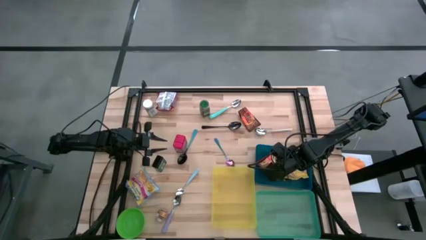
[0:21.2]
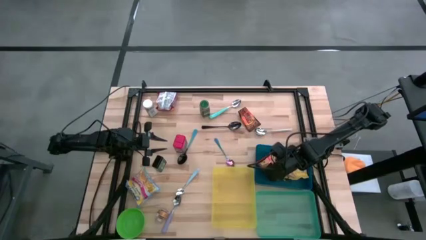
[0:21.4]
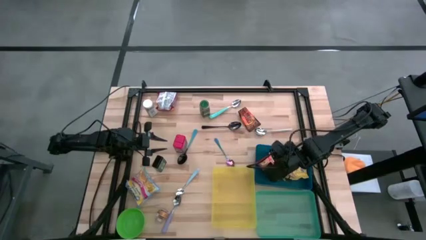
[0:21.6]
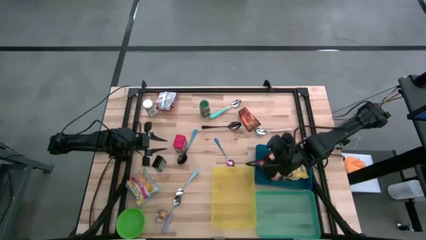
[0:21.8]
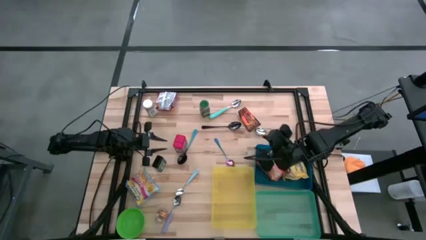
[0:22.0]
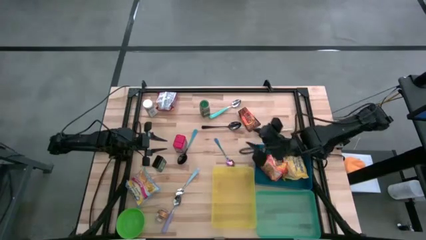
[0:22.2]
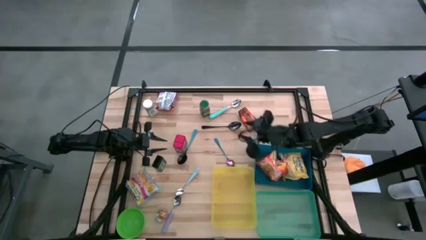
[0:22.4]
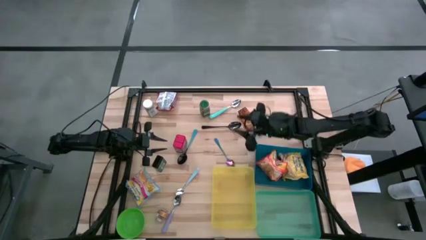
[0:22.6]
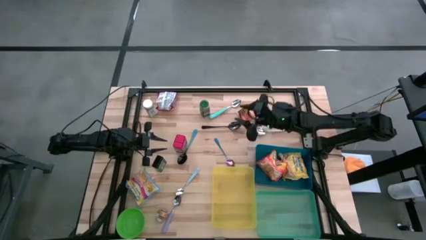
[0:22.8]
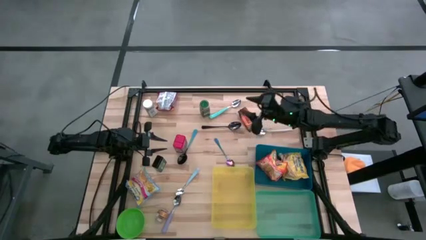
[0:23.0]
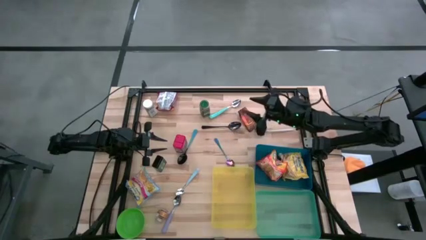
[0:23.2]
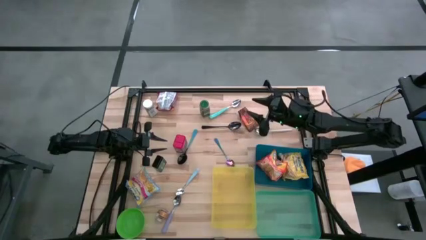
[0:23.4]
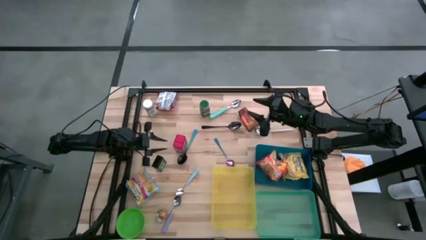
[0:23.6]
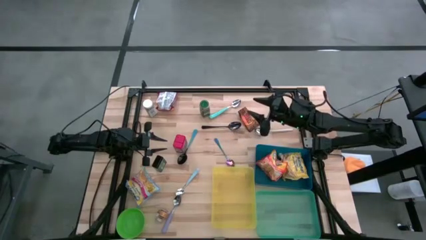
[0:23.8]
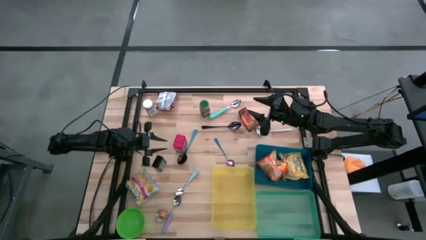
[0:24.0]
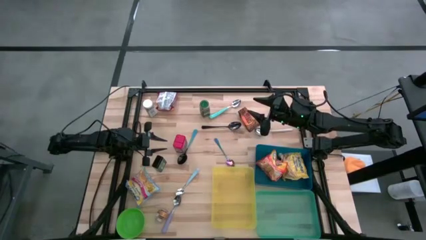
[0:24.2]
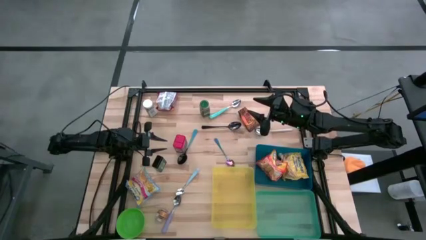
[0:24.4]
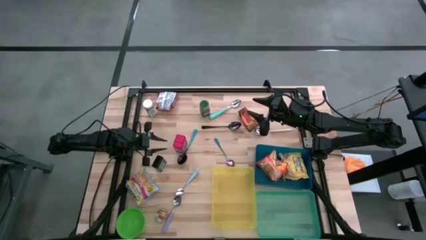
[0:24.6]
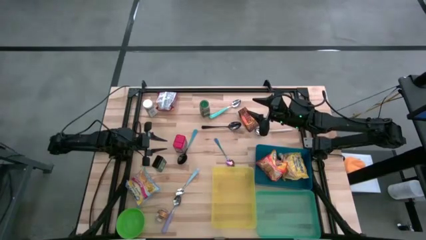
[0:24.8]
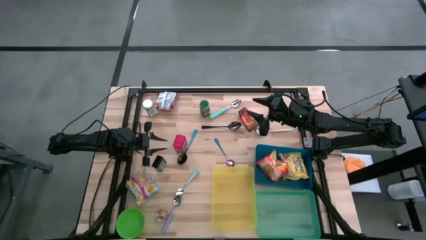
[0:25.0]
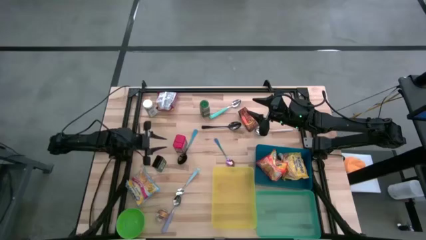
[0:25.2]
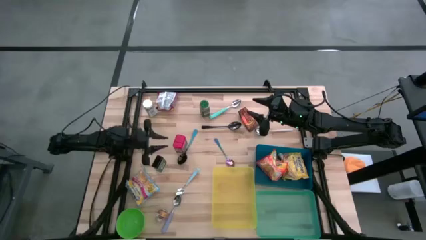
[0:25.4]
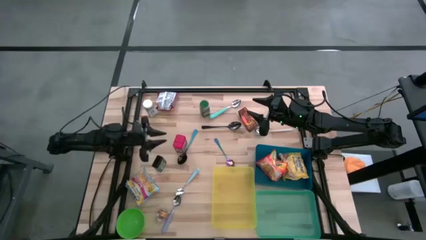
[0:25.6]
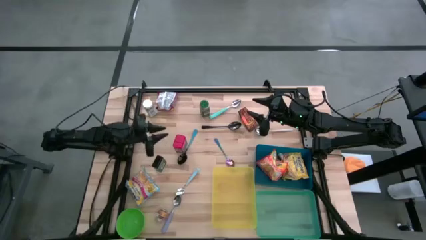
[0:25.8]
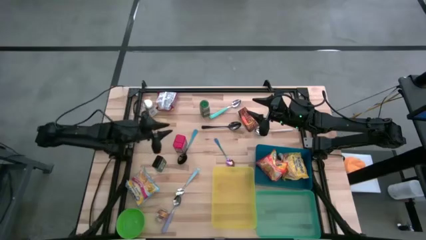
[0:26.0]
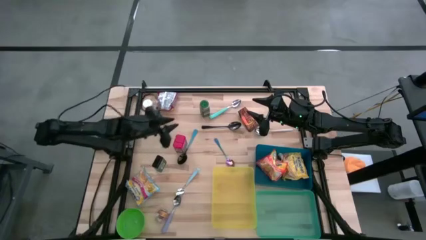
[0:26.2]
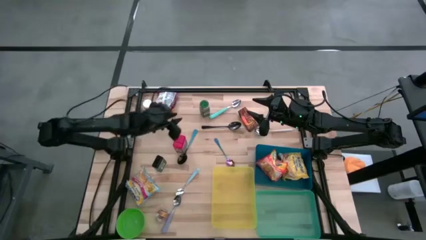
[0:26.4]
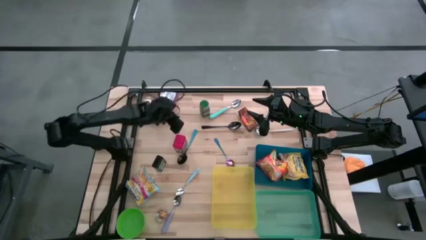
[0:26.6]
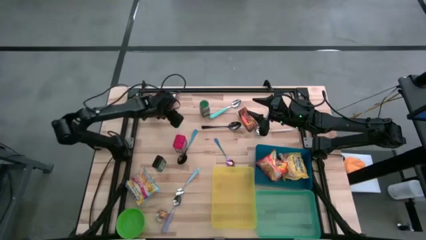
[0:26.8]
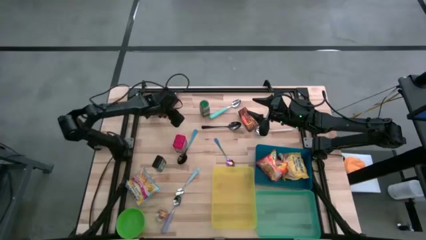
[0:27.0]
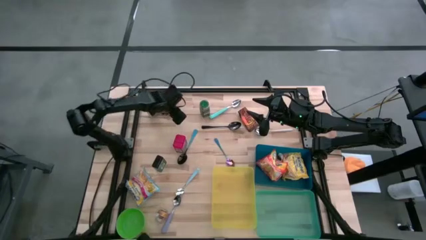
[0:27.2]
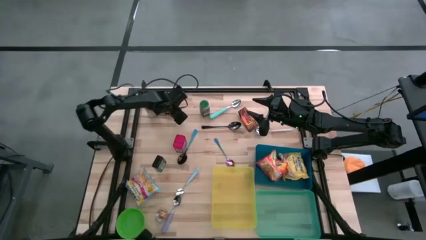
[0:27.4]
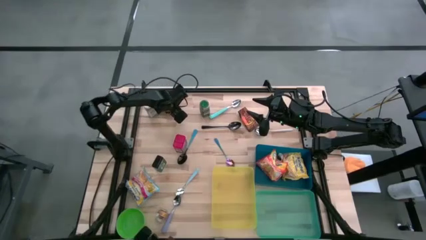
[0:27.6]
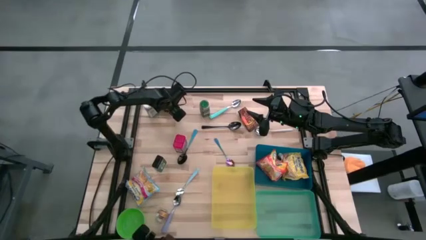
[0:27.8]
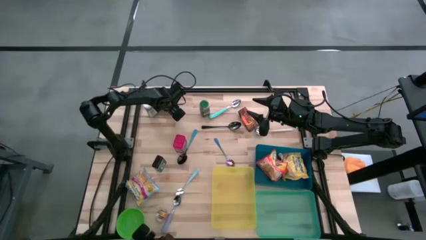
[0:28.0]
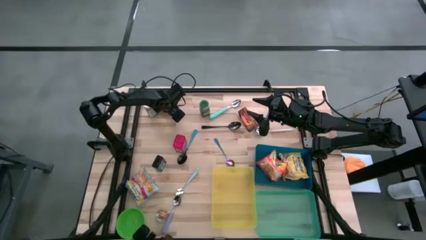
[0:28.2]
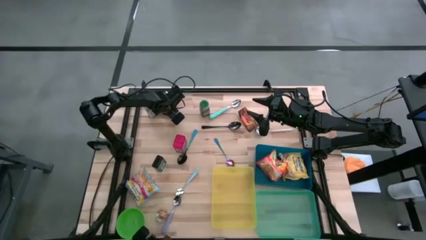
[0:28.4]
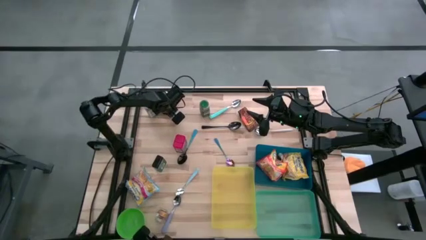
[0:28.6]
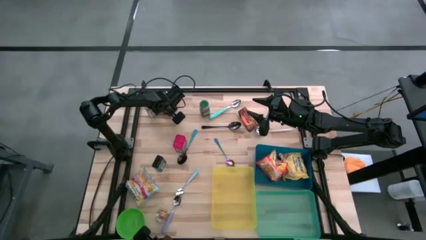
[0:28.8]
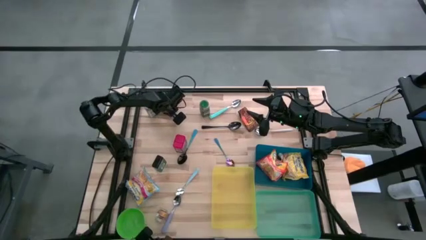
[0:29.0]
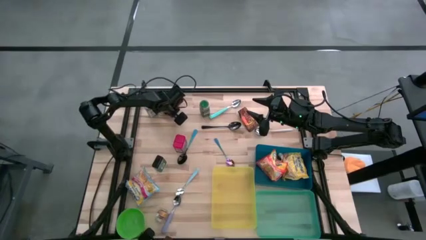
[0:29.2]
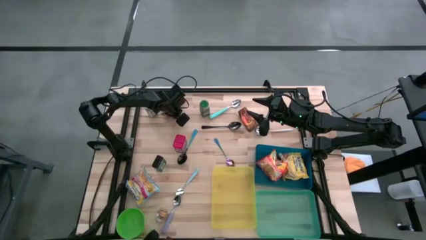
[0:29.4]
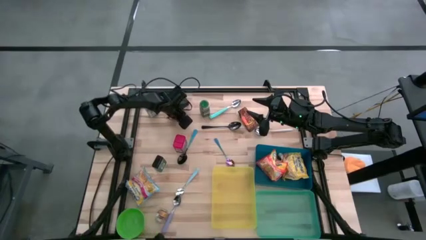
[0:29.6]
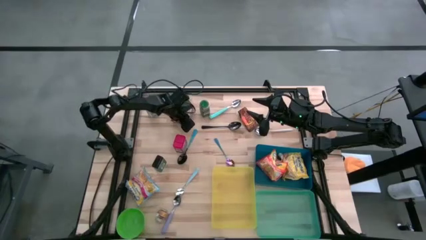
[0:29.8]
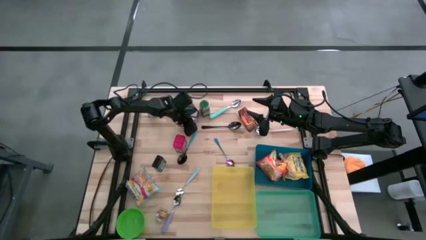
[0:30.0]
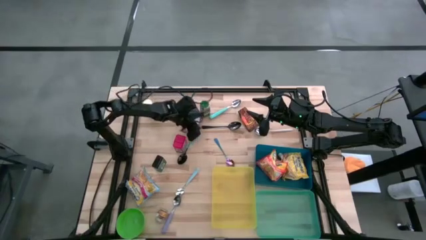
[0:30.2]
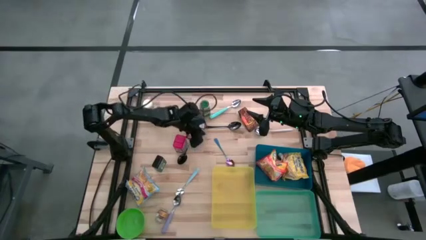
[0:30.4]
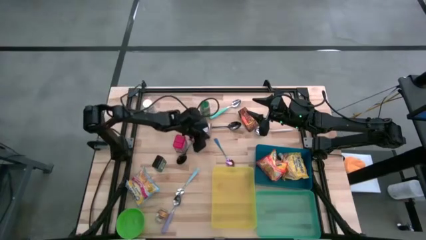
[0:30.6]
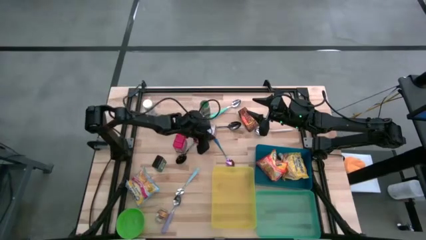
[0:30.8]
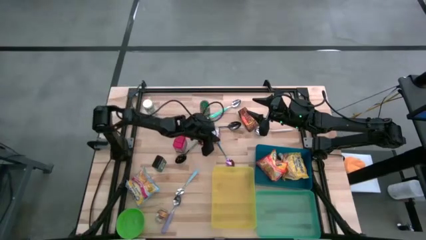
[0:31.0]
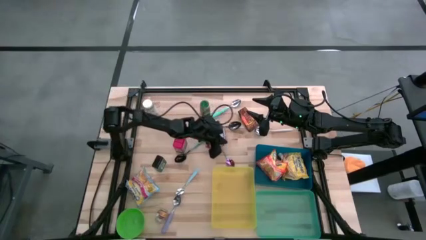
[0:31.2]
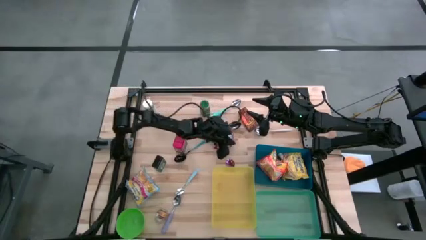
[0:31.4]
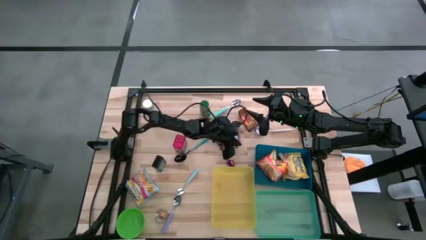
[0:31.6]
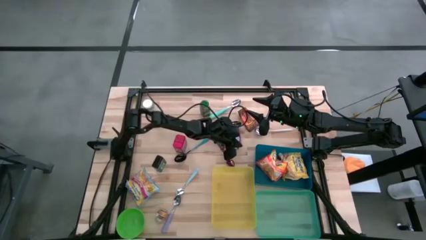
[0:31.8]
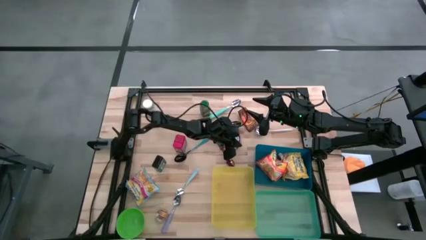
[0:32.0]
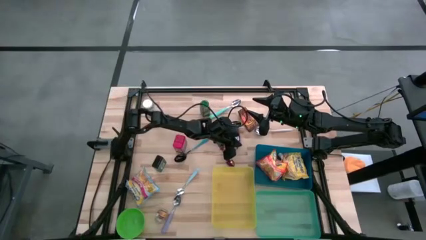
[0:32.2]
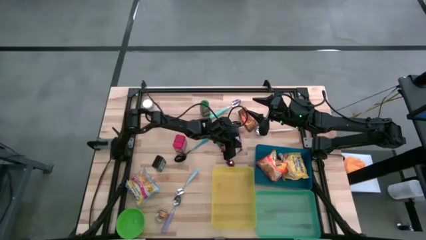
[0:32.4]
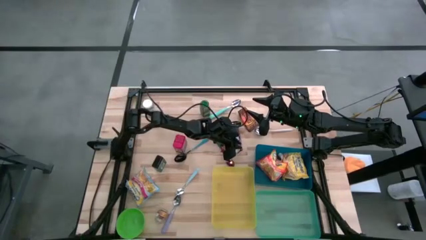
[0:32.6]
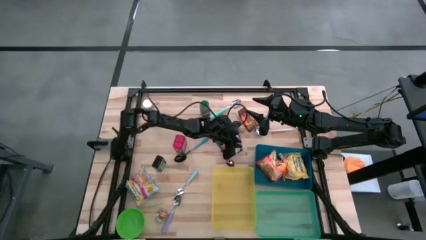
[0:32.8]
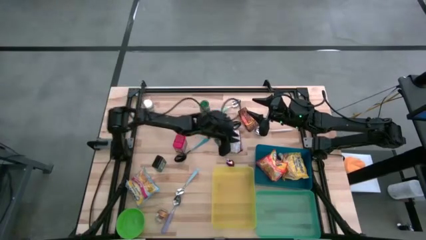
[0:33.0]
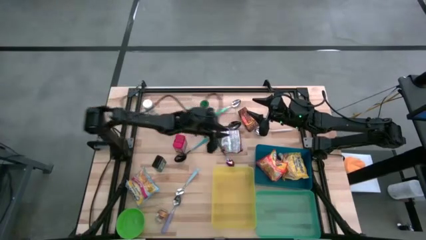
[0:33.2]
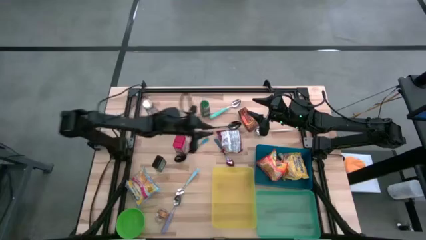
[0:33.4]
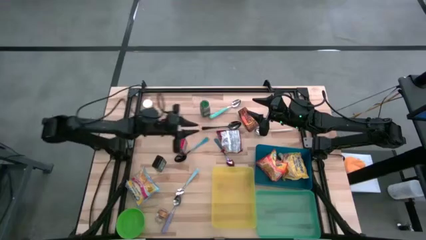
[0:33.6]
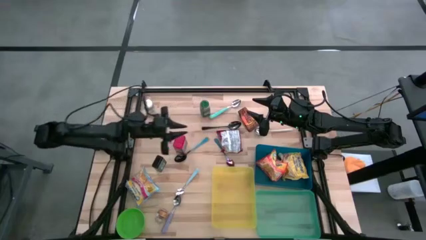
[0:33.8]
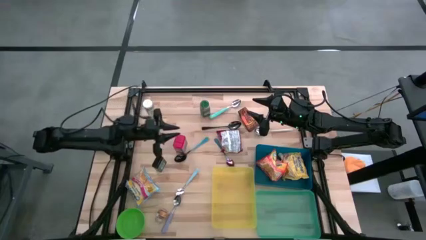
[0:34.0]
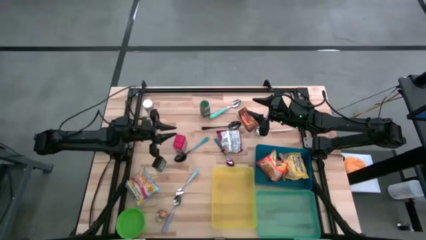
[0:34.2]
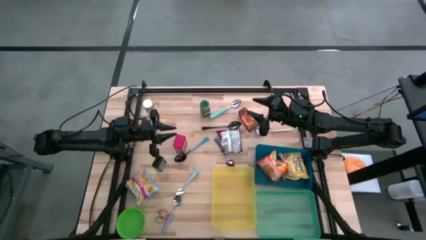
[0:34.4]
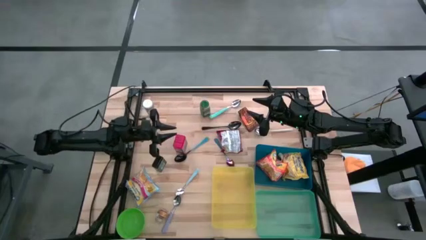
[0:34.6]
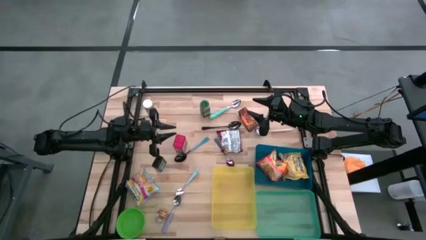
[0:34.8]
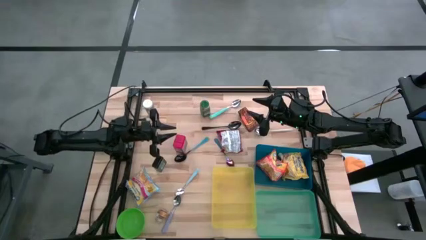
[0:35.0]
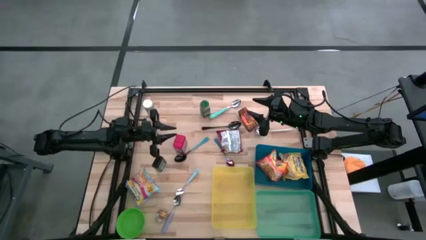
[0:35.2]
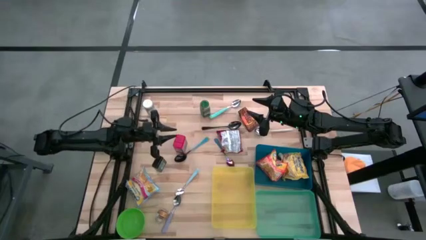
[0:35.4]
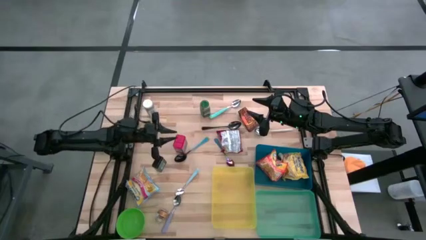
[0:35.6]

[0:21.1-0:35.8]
Put the red noodle pack into the blue bin
